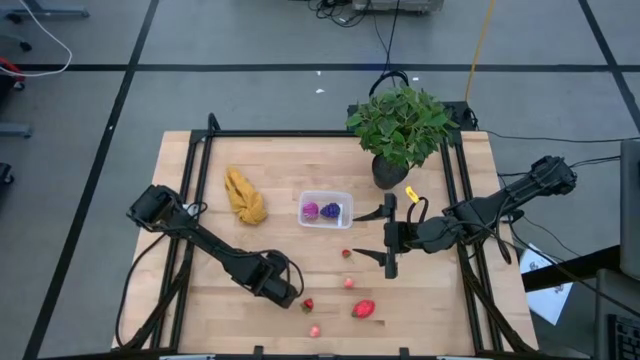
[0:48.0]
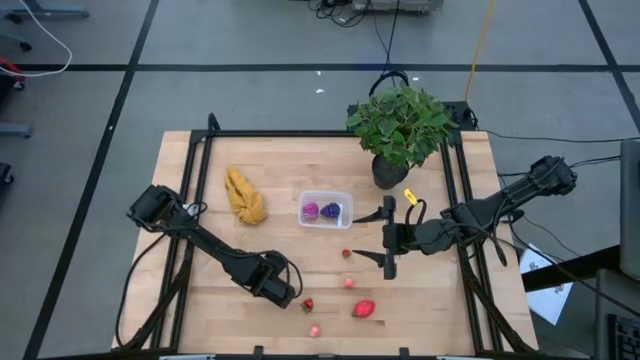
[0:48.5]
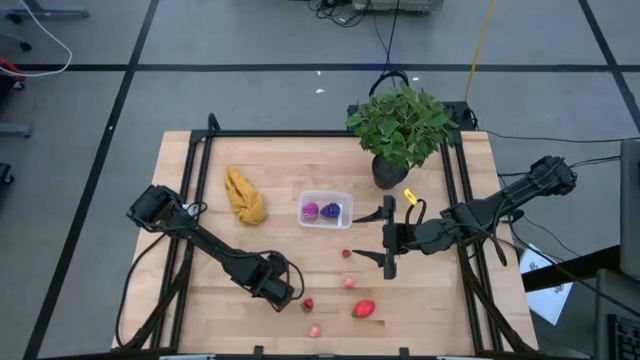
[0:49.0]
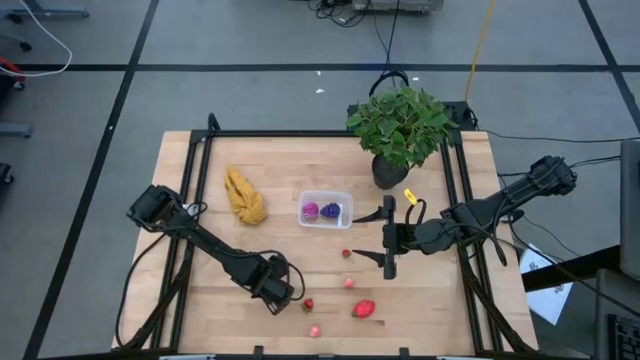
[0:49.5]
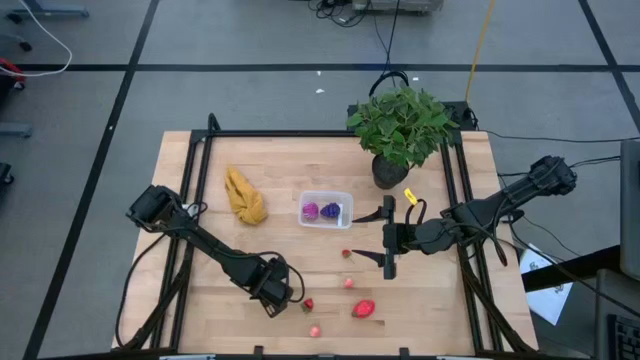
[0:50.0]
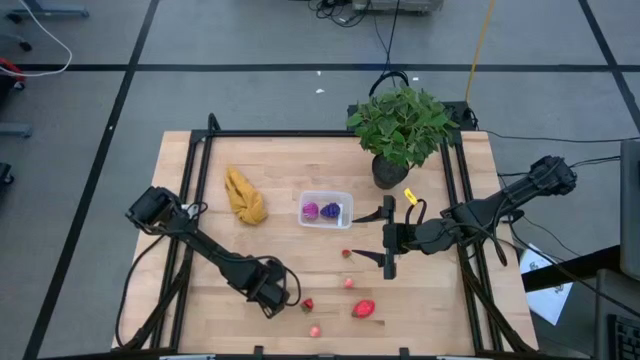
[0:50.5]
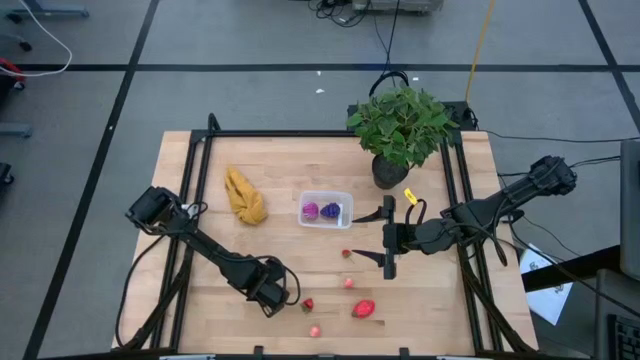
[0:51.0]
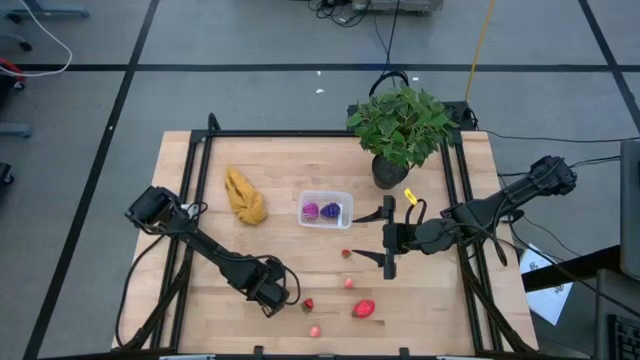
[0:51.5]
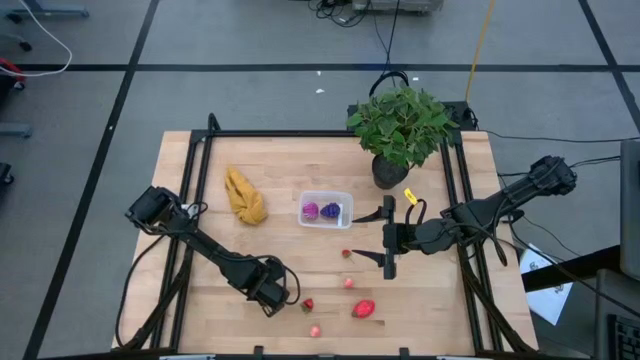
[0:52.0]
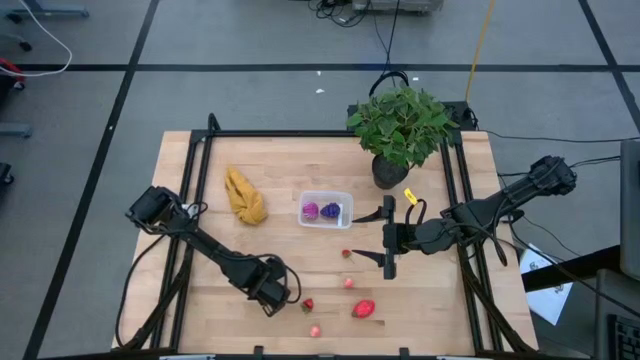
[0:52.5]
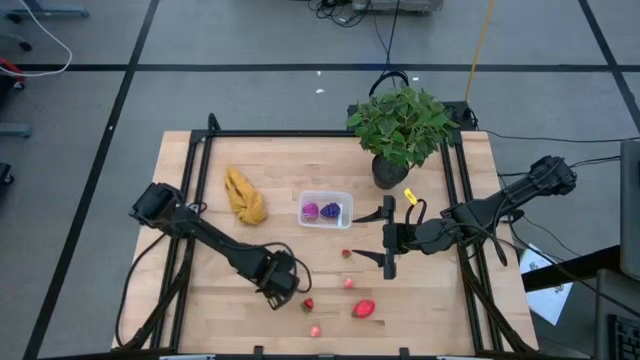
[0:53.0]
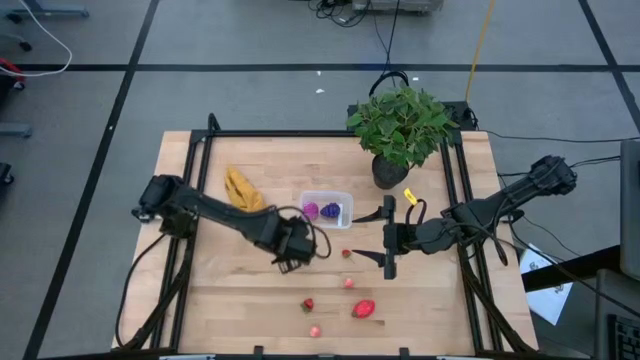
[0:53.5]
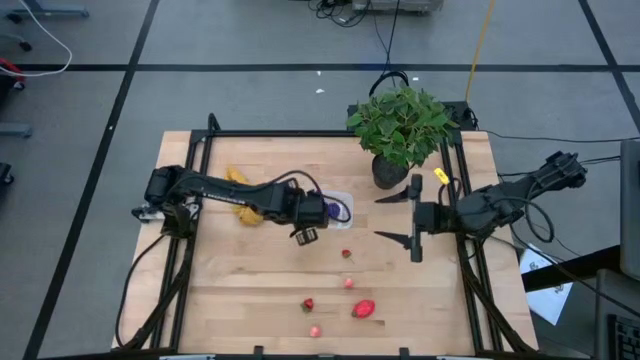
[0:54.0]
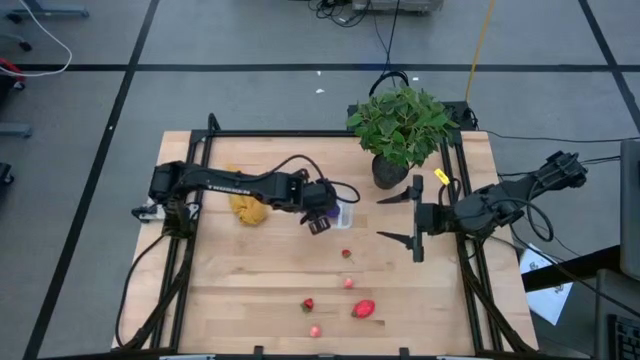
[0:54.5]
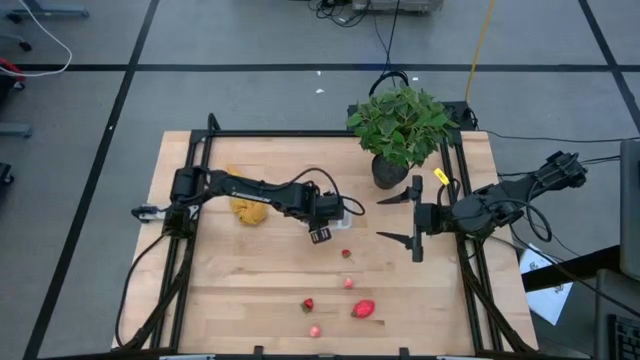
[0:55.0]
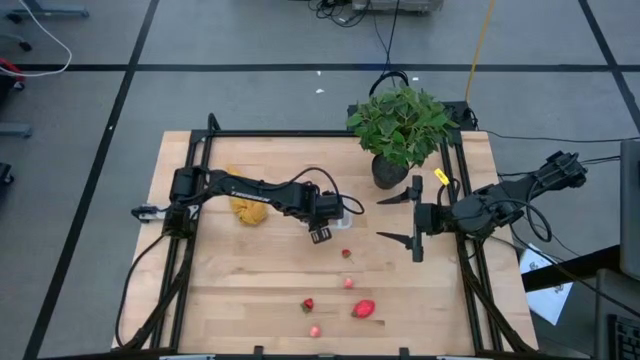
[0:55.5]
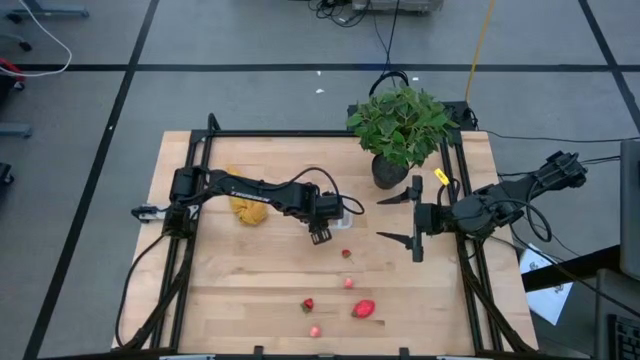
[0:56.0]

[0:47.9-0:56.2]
Task: Pick and placing Produce into tupperware
Put the bottom left red strawberry into the transparent bin

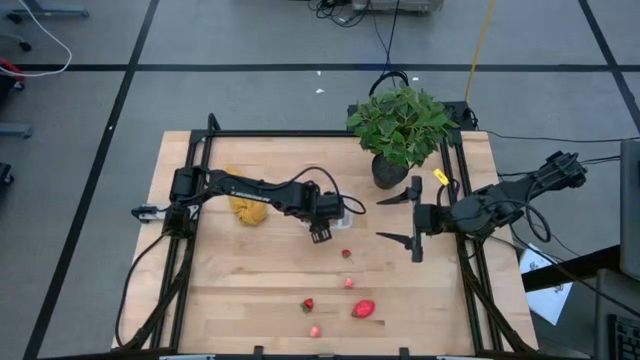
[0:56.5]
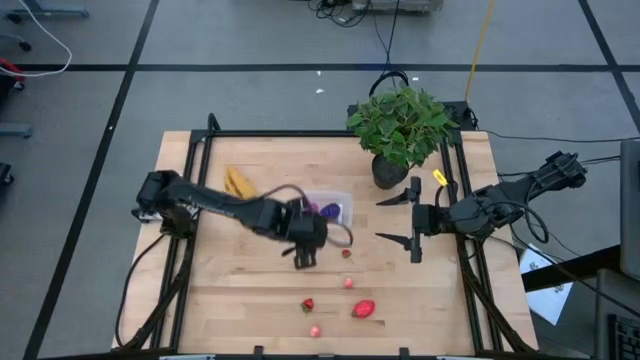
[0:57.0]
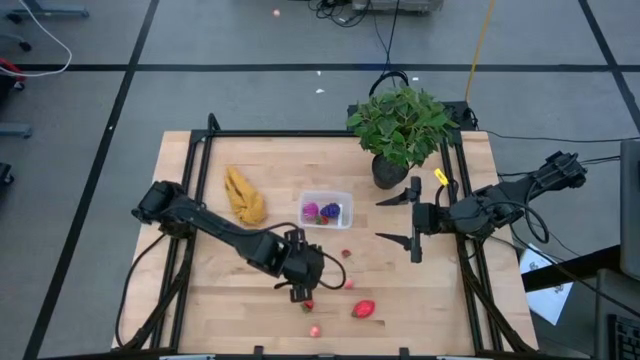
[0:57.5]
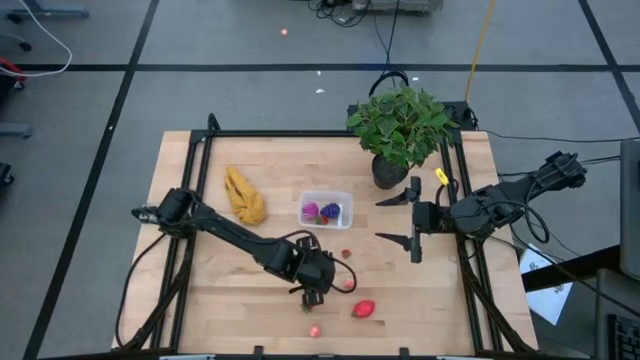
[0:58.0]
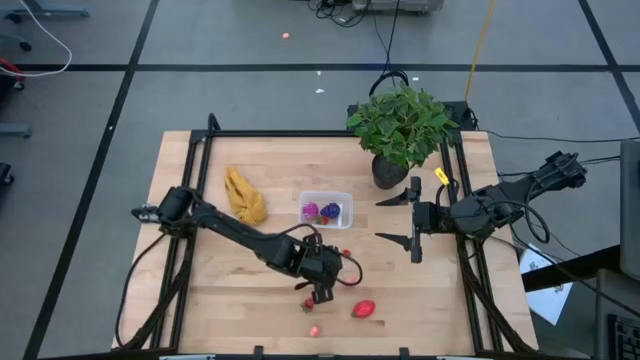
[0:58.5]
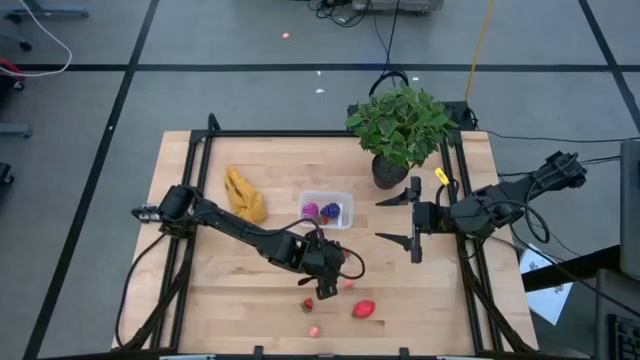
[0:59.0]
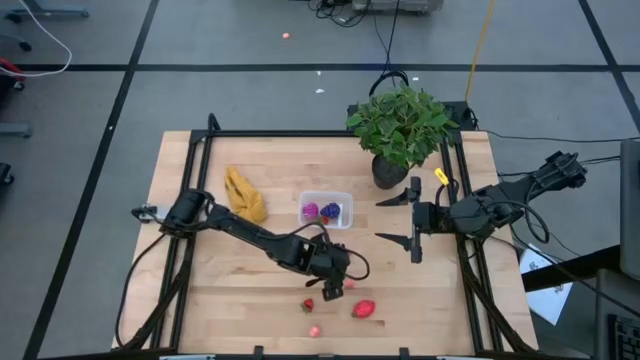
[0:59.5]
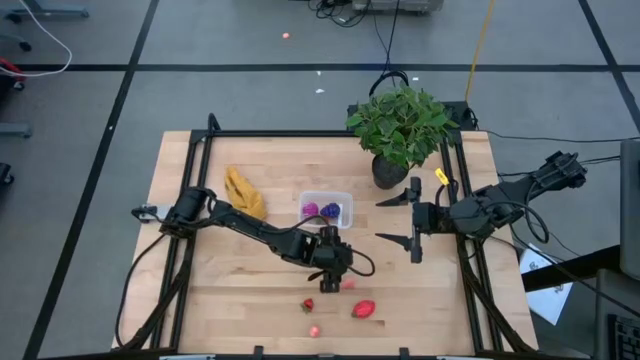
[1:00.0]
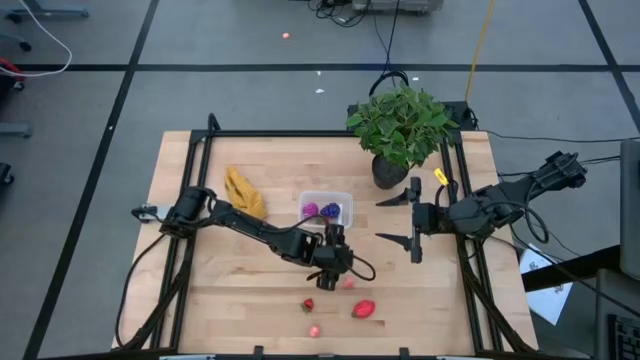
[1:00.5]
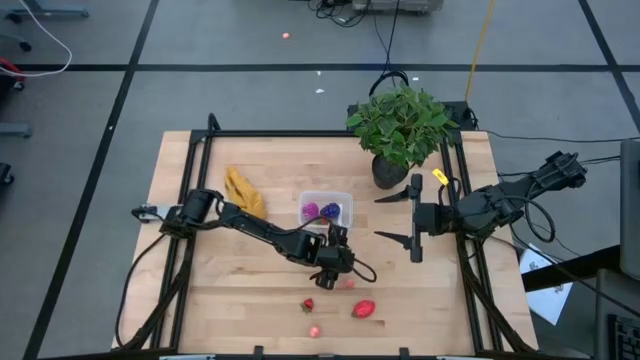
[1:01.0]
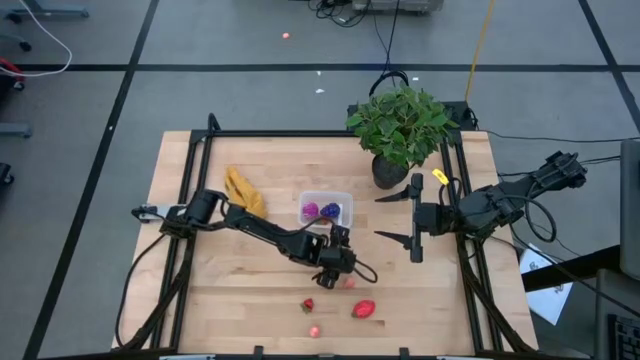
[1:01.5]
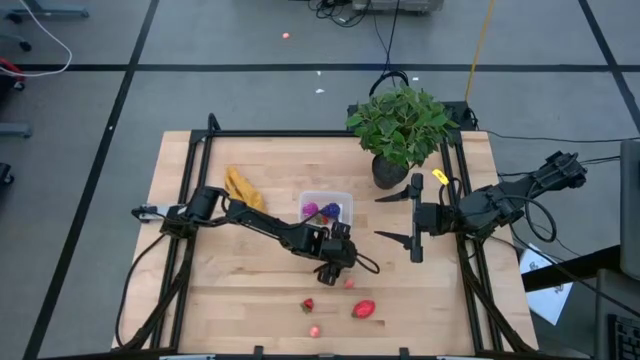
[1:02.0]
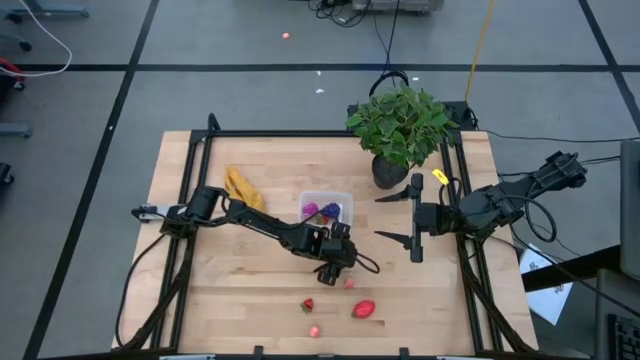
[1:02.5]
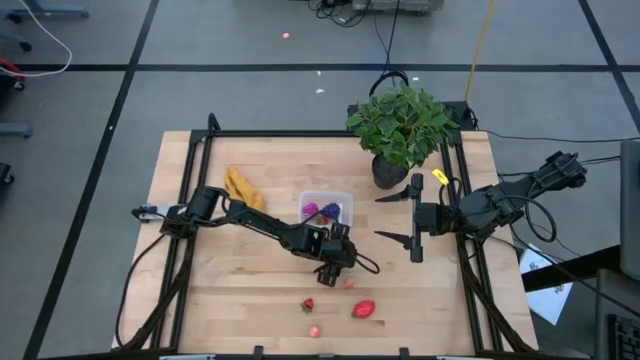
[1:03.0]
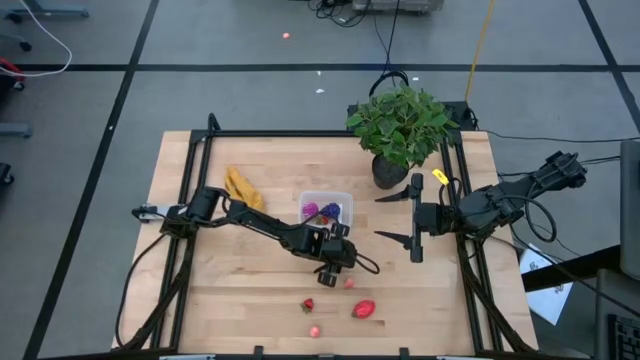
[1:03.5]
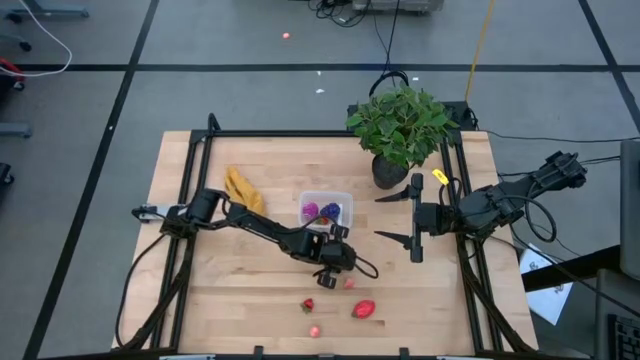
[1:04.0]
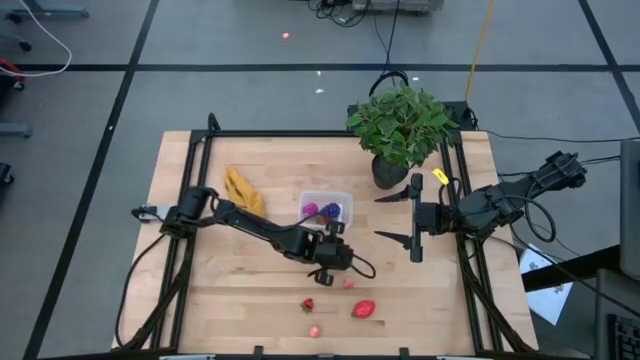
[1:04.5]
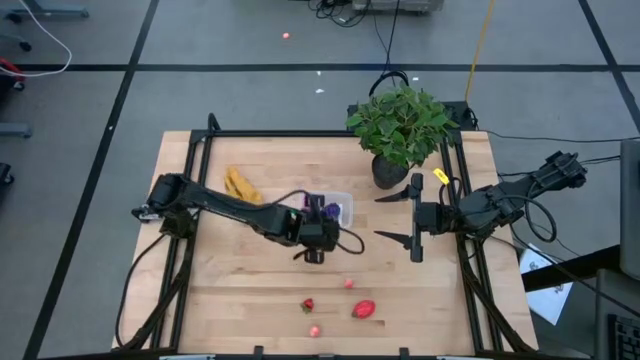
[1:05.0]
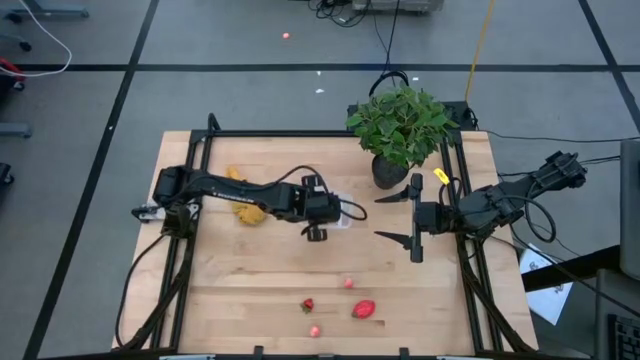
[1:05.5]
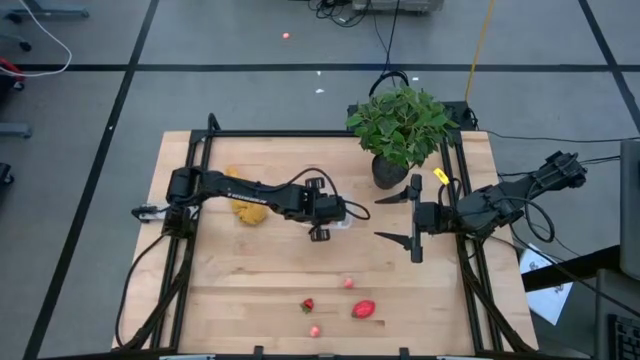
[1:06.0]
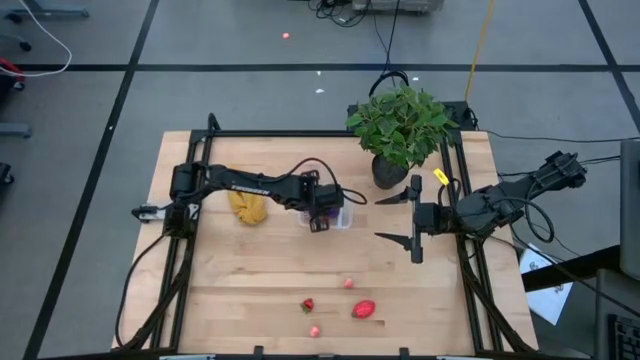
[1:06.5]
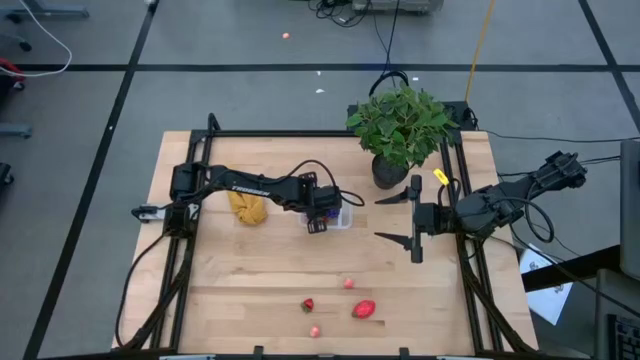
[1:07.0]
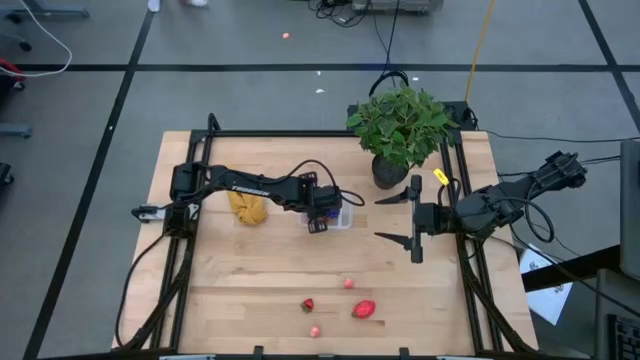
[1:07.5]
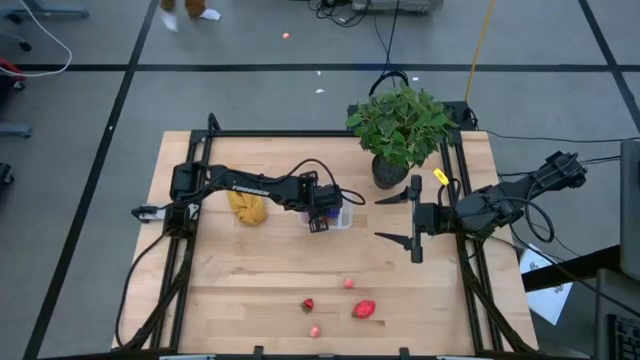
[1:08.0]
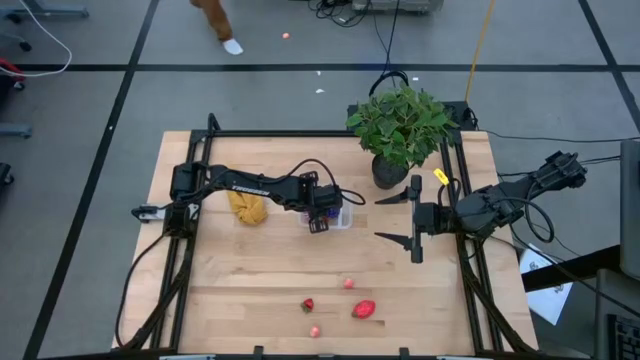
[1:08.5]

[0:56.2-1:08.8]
Put the top red strawberry into the transparent bin
